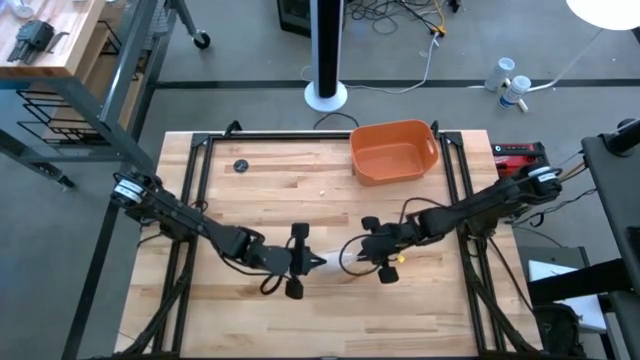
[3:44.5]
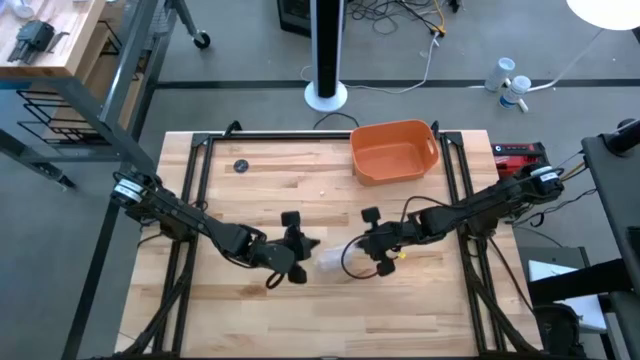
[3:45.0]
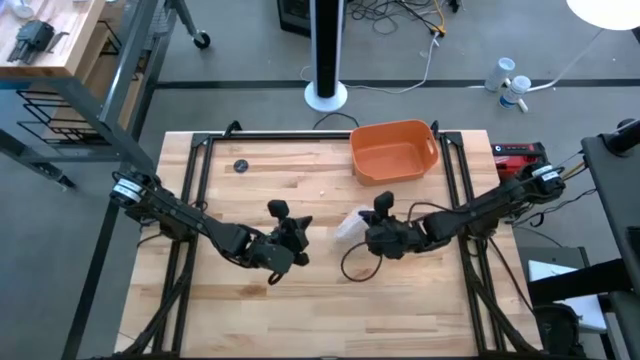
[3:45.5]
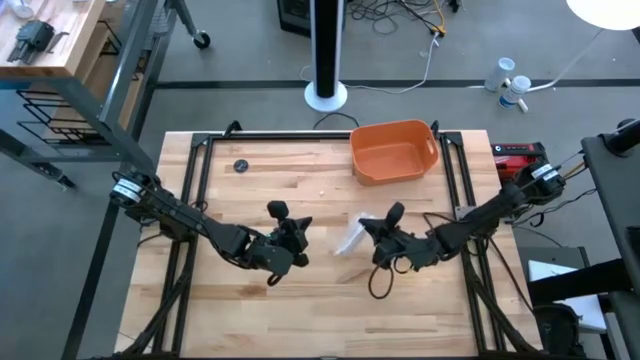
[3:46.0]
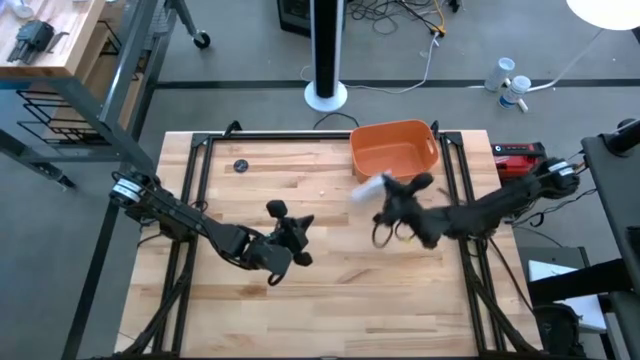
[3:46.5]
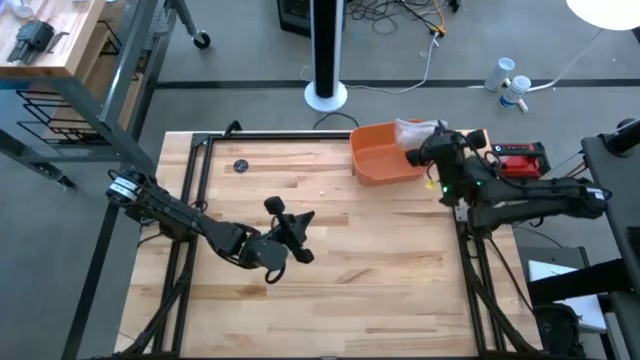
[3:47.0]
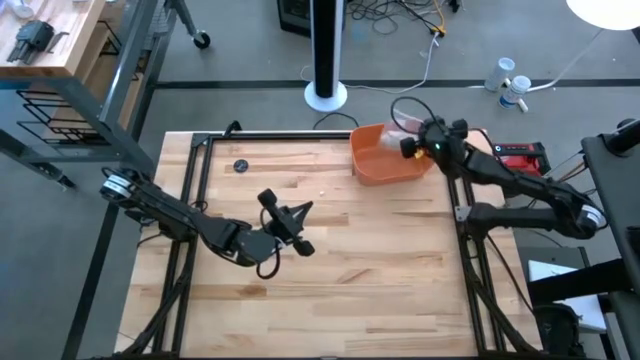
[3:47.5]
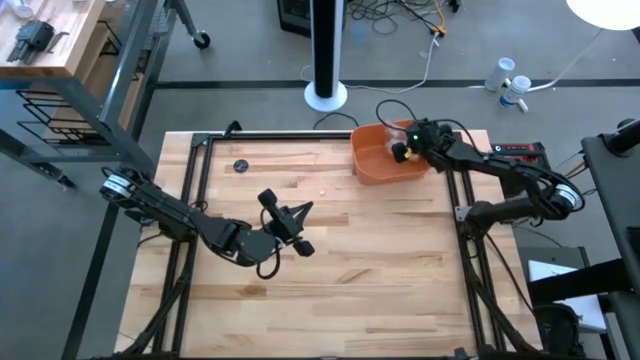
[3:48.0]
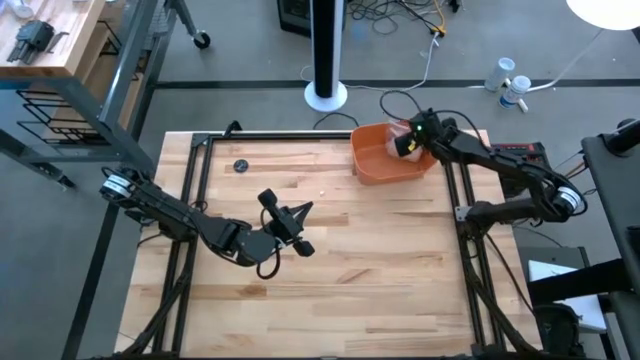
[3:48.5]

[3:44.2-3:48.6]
Task: Roll bandage
Put the transparent zip bag into the orange bin

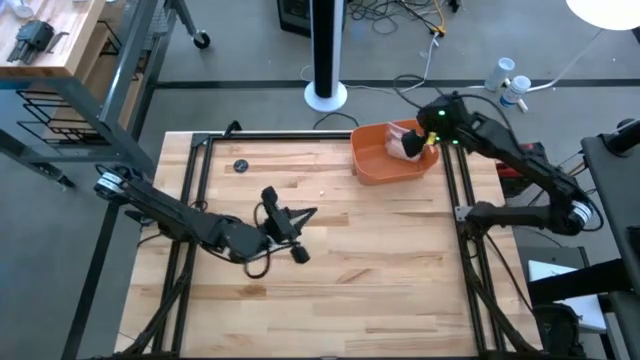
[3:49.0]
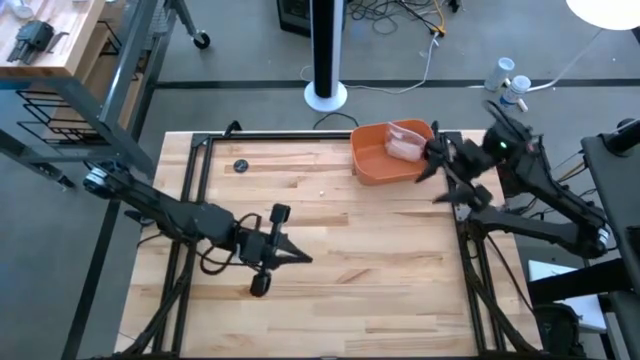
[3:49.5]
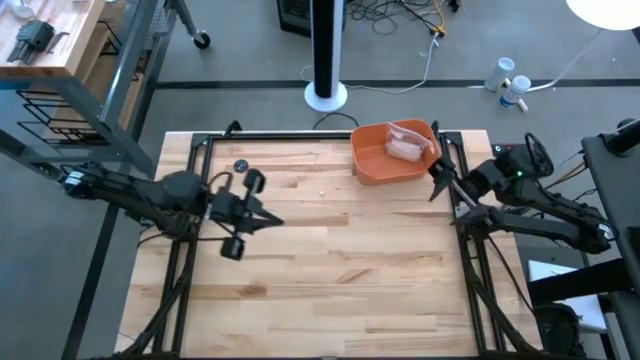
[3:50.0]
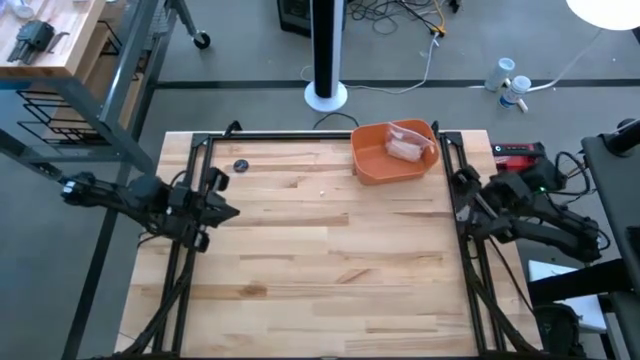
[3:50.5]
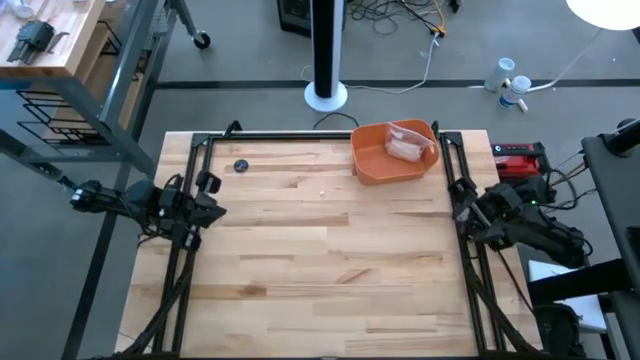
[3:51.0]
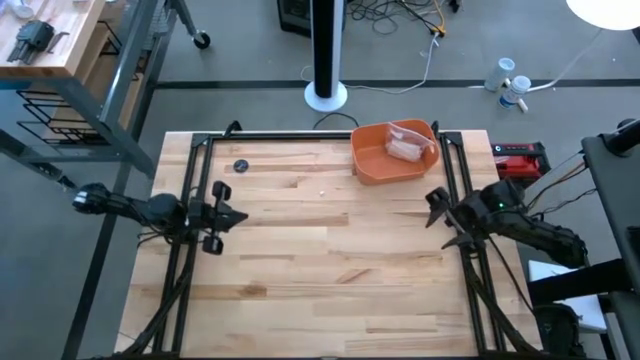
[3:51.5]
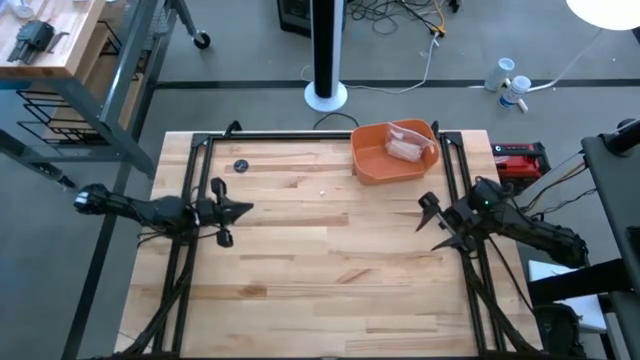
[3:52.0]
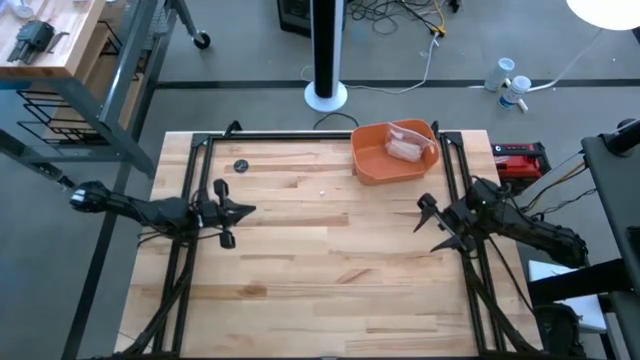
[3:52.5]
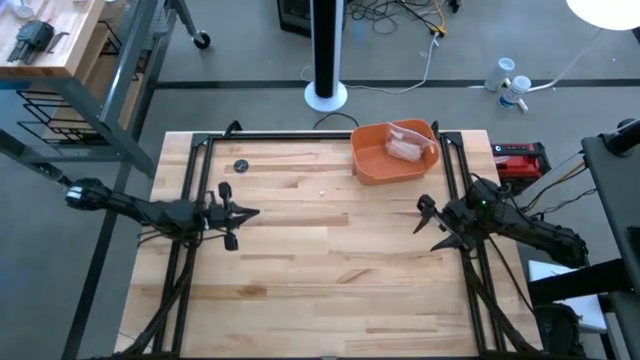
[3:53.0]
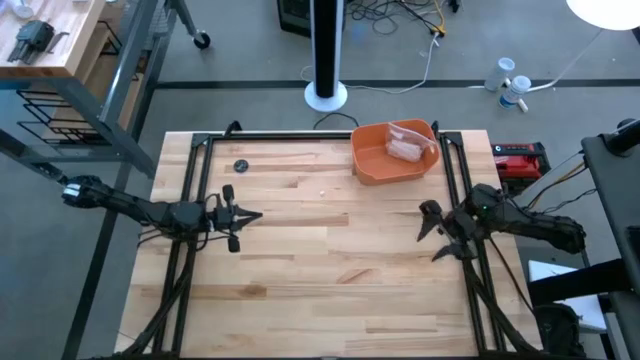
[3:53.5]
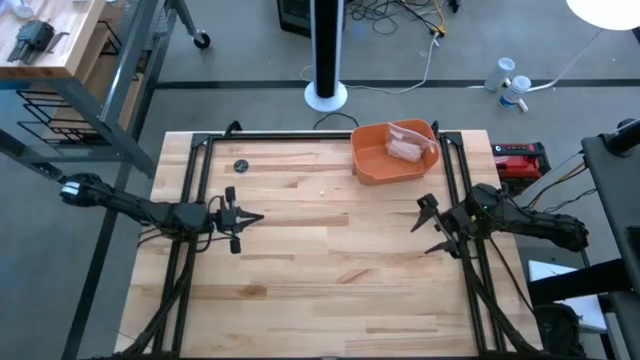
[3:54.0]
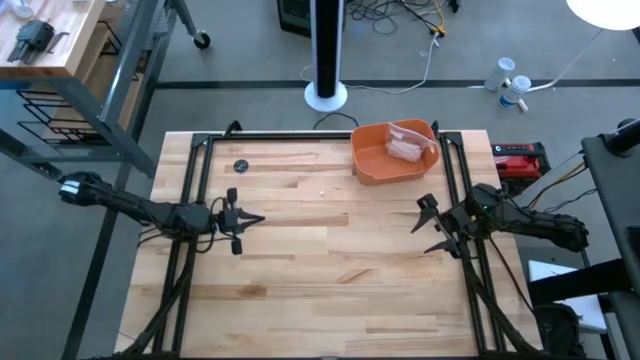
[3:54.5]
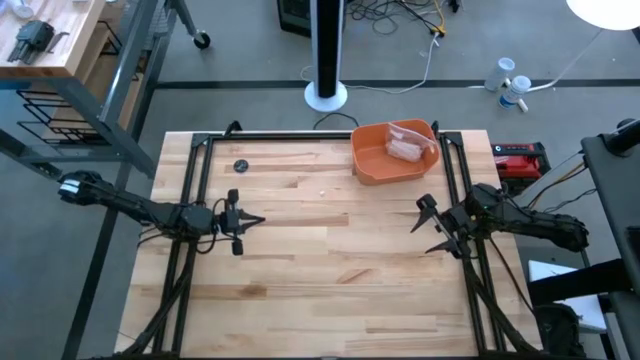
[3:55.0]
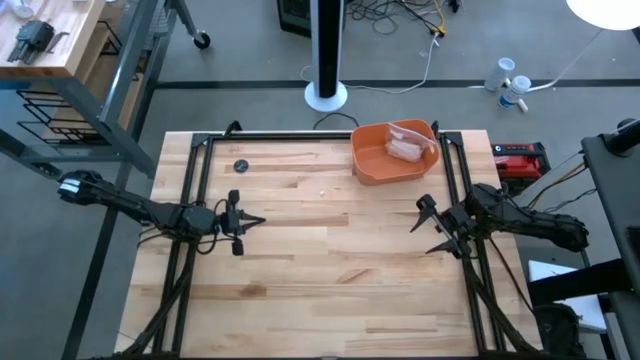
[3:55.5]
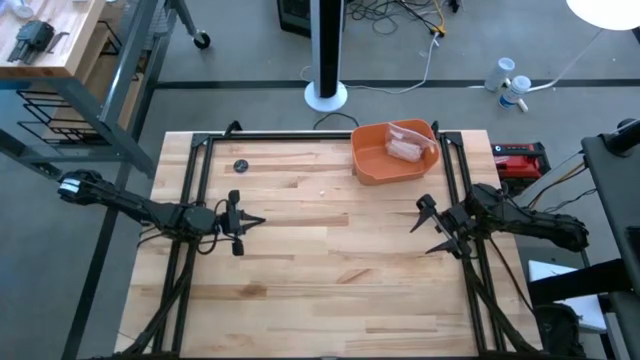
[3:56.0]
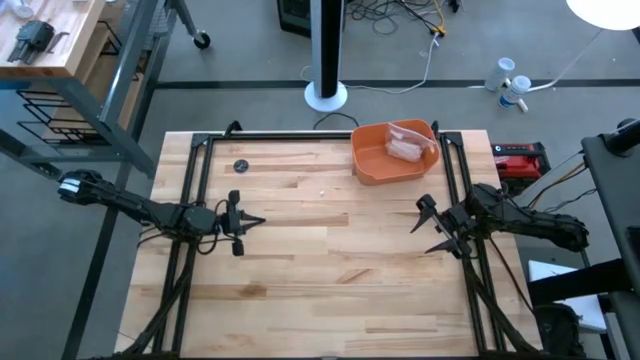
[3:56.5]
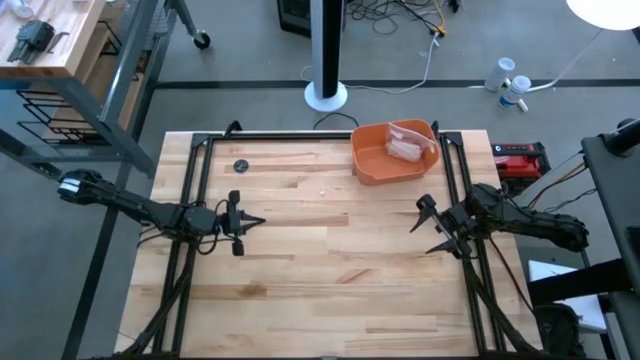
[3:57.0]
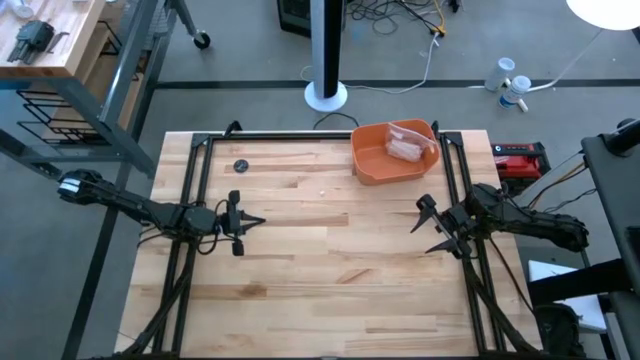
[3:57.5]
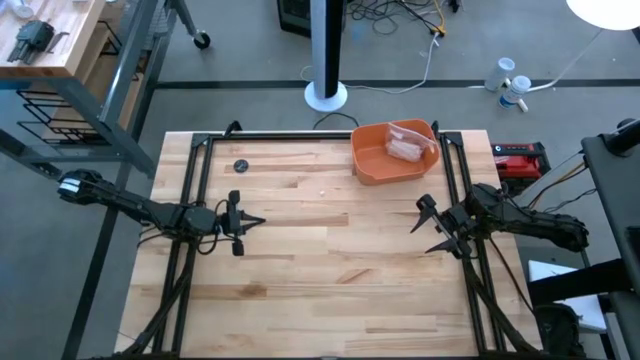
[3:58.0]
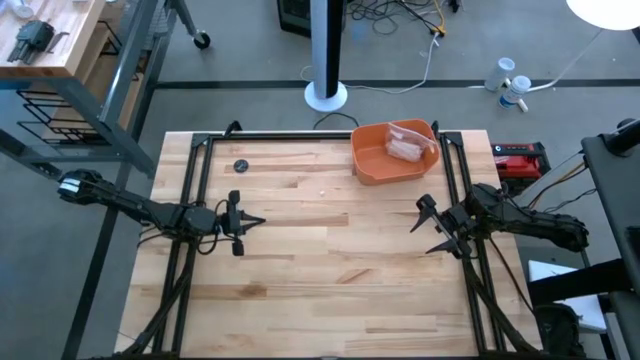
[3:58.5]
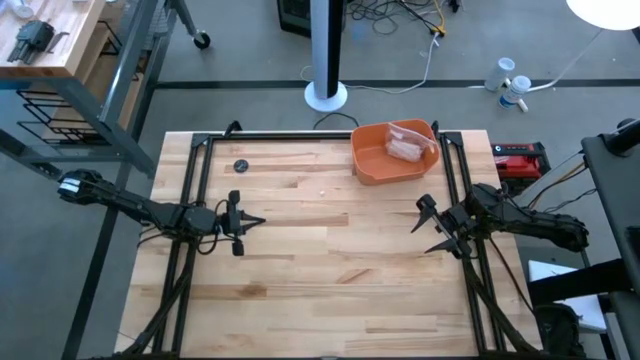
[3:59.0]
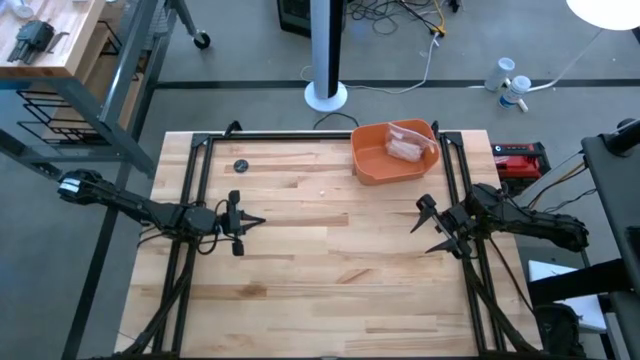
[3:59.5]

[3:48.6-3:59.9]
Return to Home Position

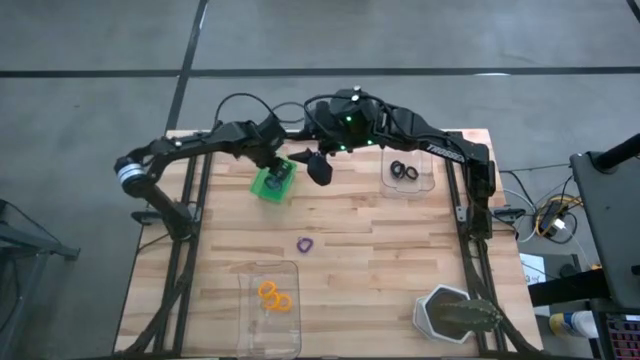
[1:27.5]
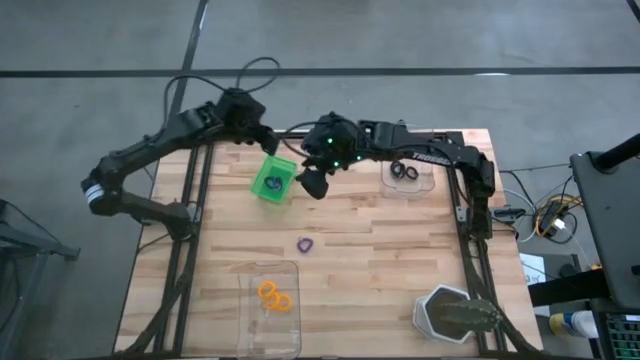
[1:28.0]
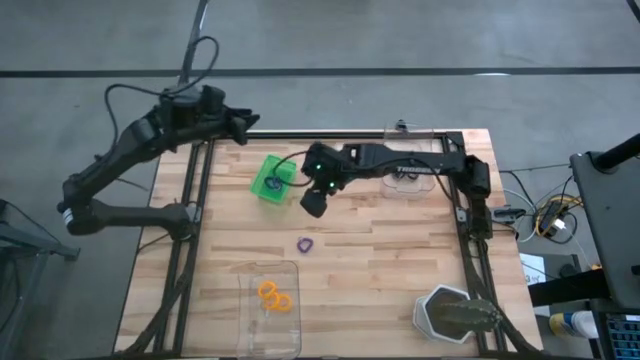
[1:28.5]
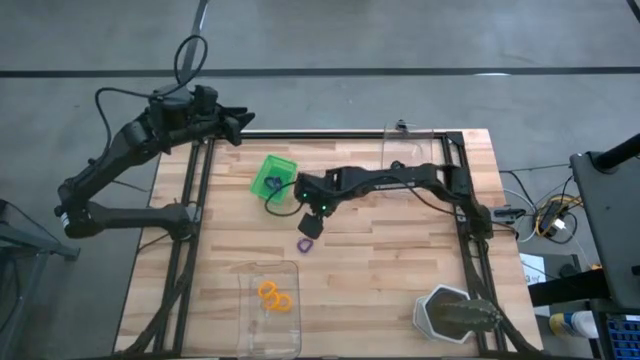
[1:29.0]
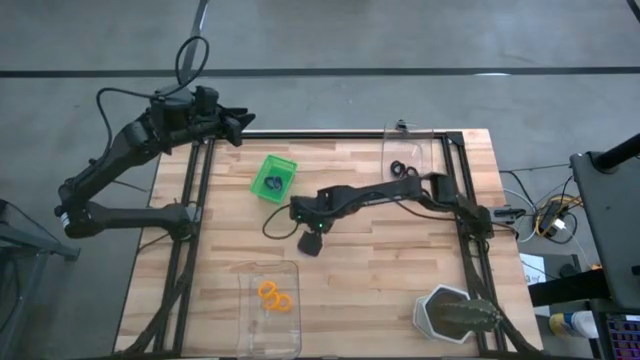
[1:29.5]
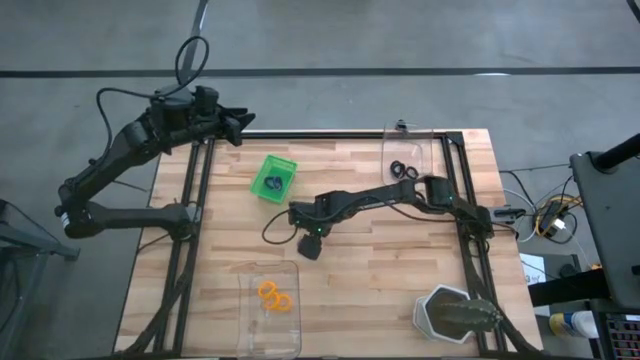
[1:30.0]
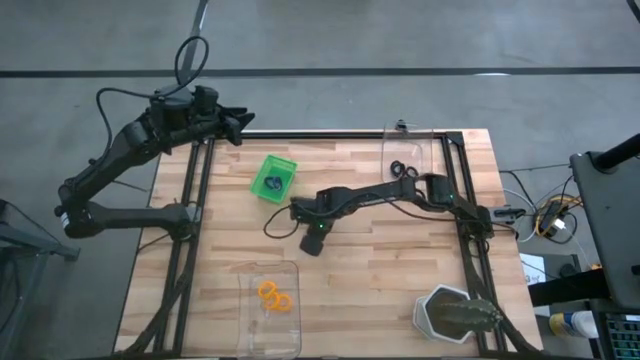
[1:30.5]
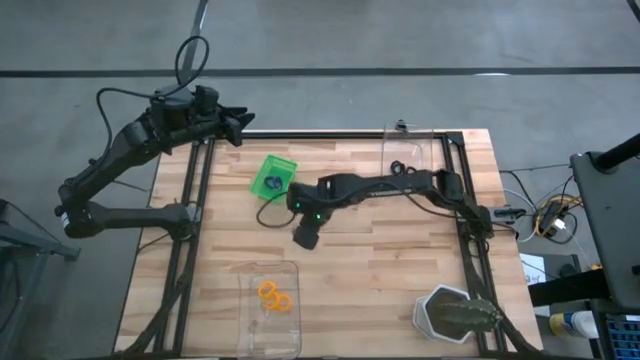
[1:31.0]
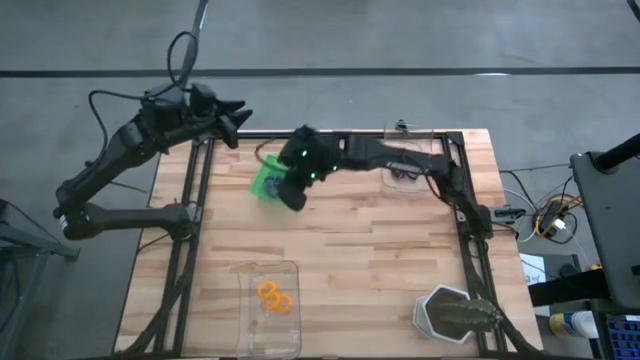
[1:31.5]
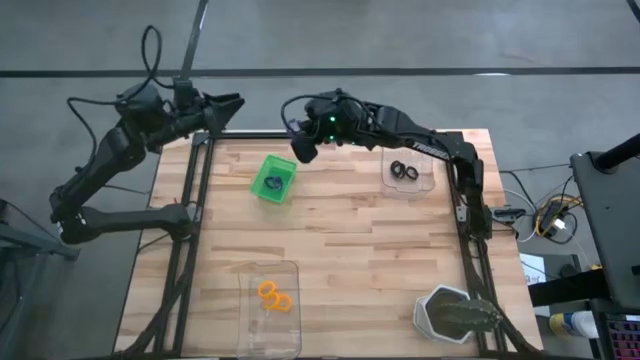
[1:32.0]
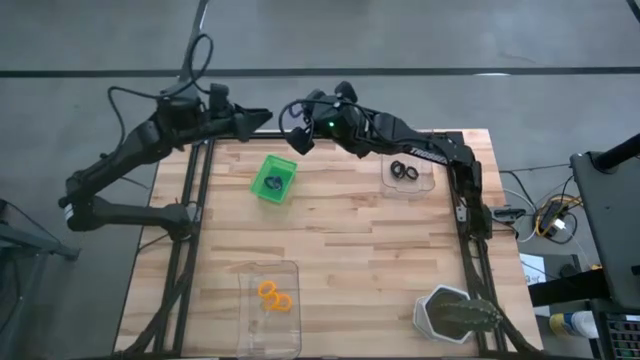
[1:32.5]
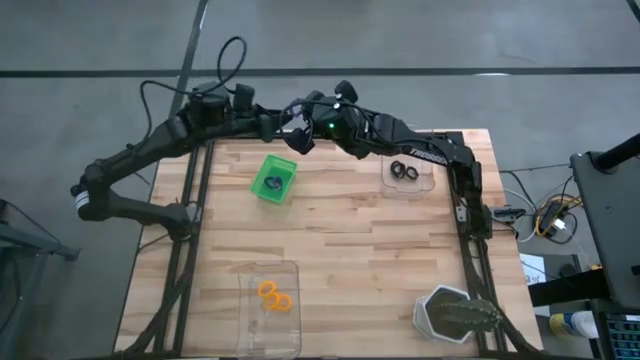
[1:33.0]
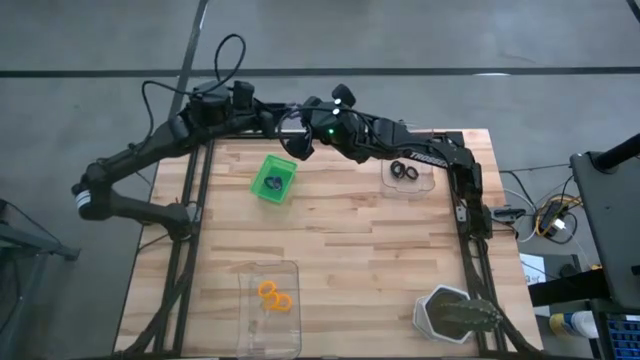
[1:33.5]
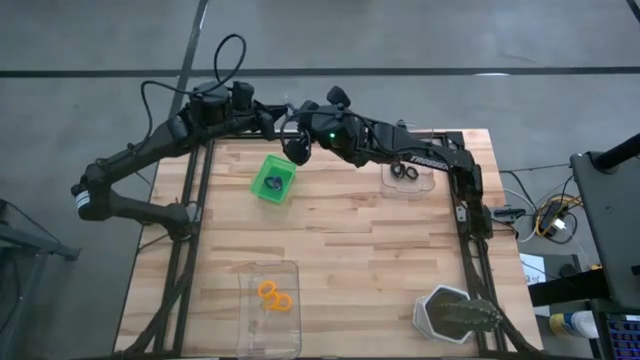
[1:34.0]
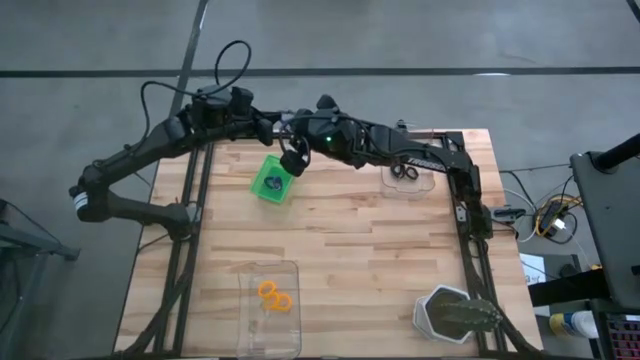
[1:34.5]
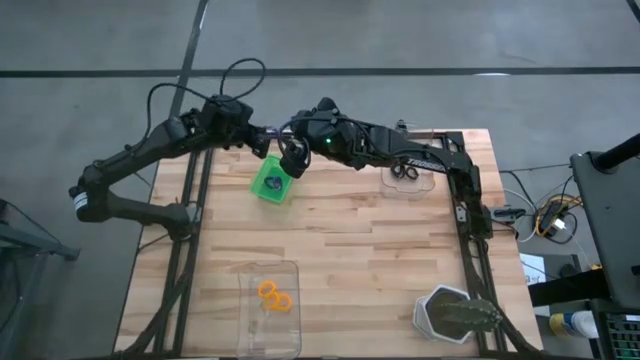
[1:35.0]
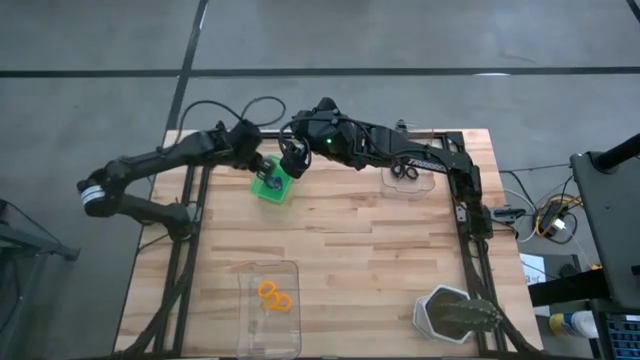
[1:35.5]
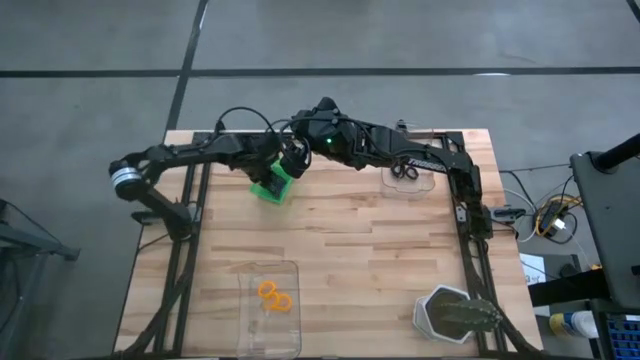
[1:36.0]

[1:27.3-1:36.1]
Task: Sort spring keychains
Put the purple spring keychain into the green bin
